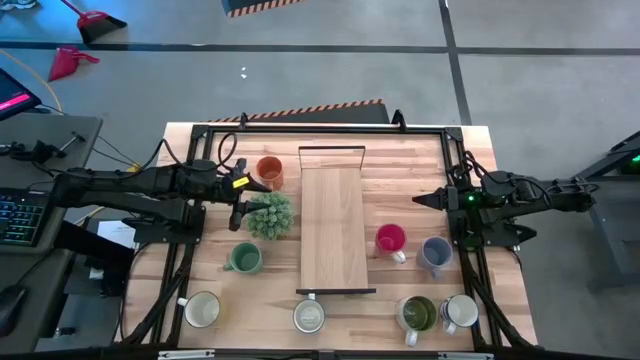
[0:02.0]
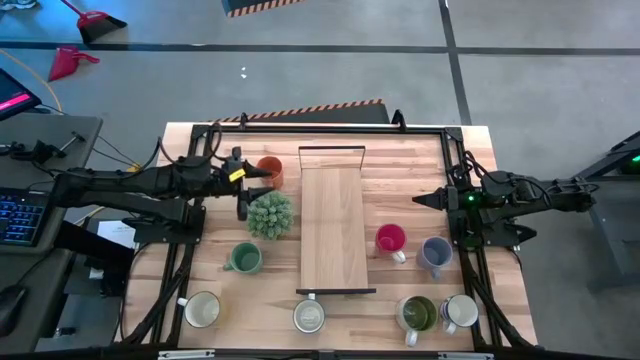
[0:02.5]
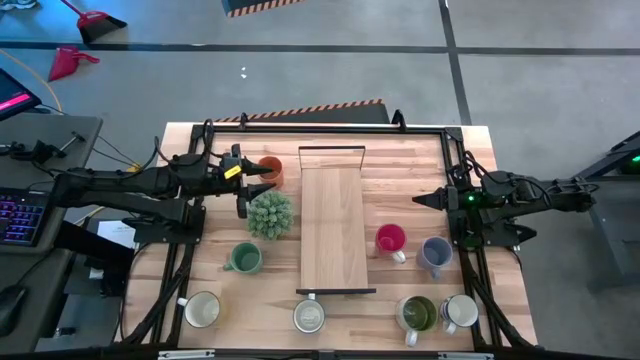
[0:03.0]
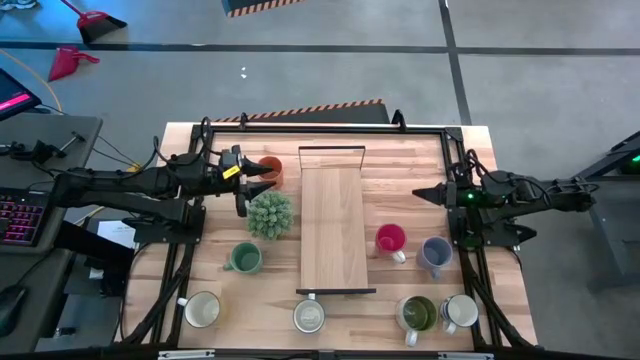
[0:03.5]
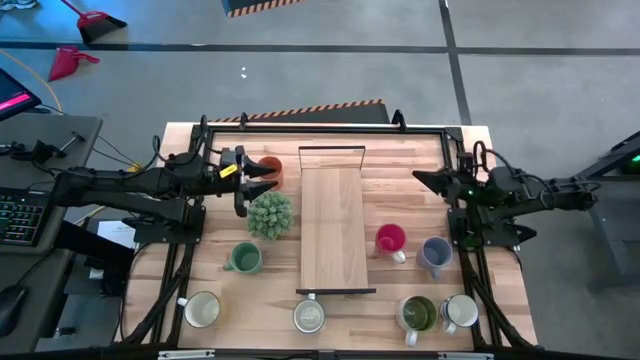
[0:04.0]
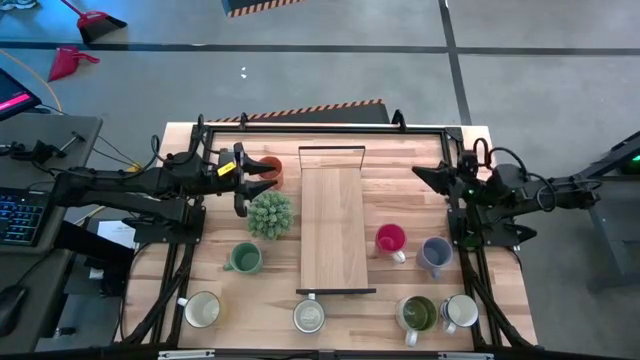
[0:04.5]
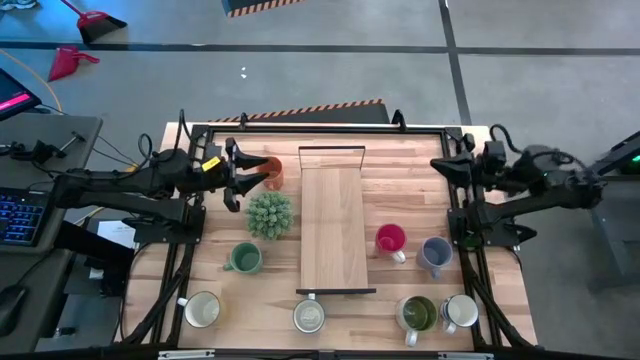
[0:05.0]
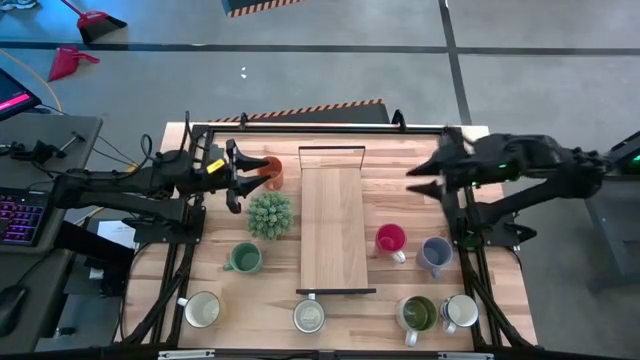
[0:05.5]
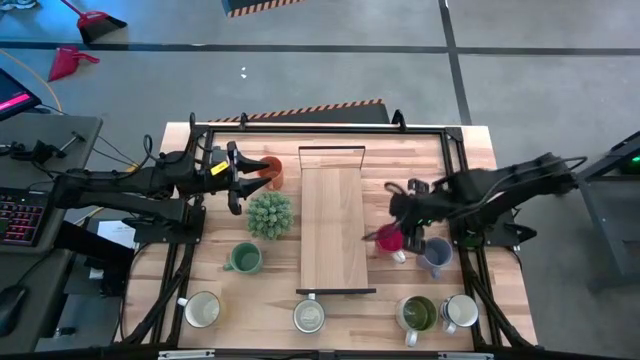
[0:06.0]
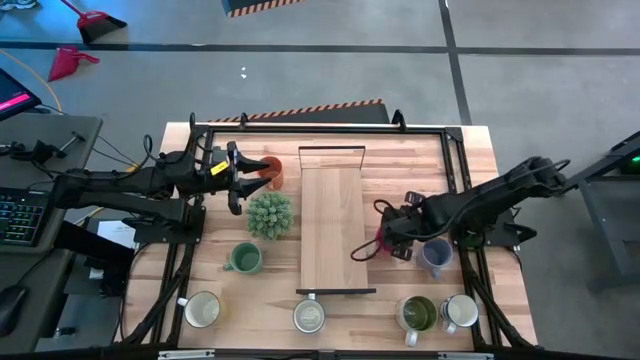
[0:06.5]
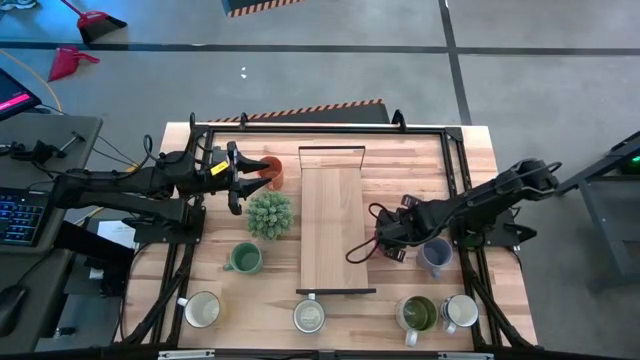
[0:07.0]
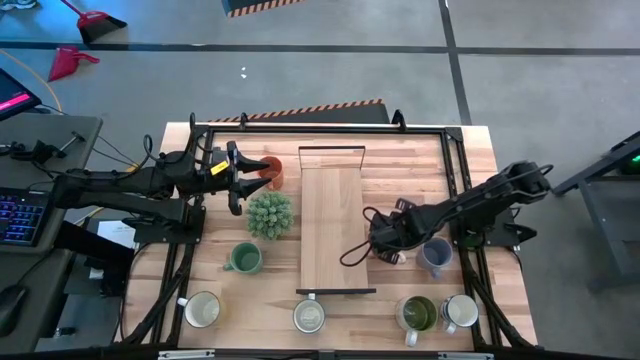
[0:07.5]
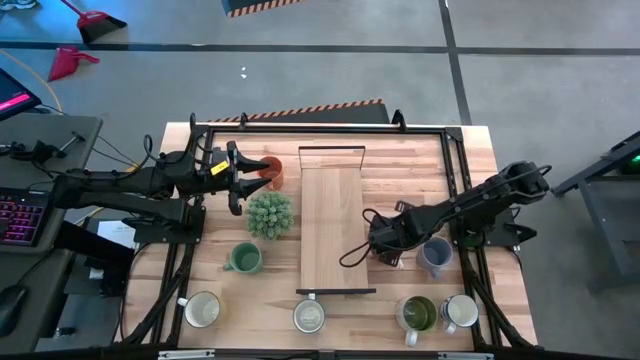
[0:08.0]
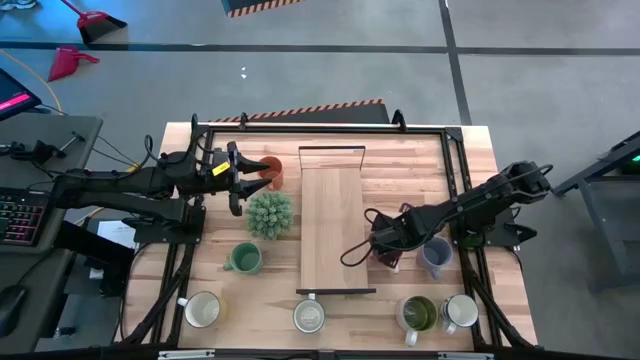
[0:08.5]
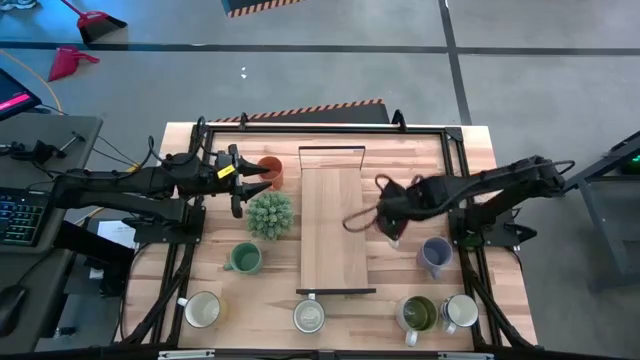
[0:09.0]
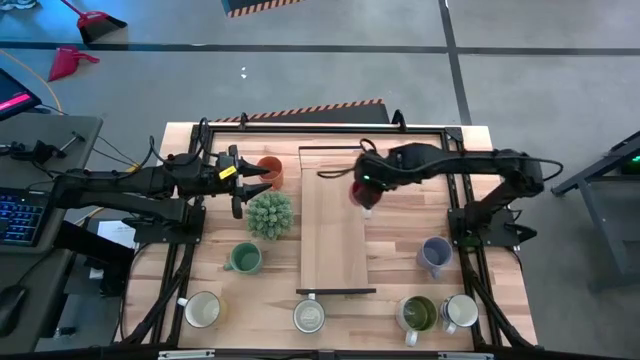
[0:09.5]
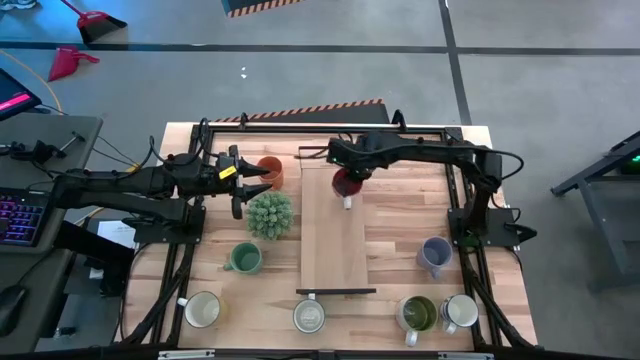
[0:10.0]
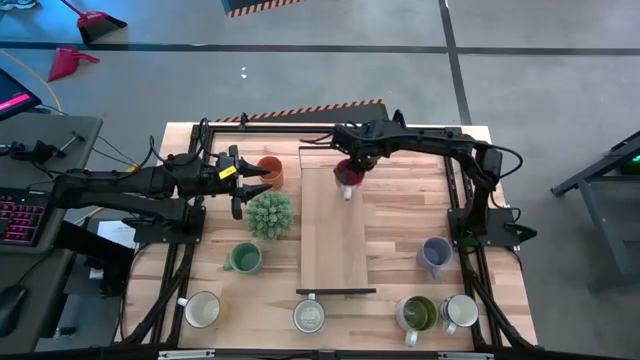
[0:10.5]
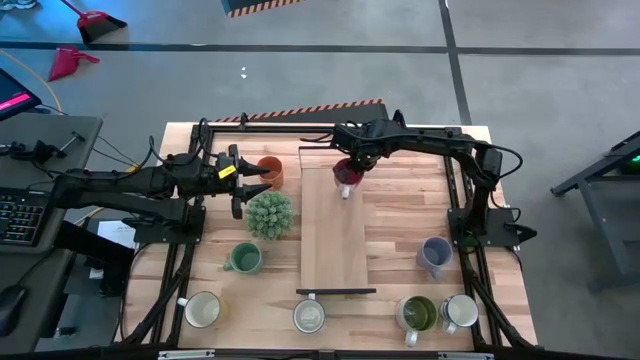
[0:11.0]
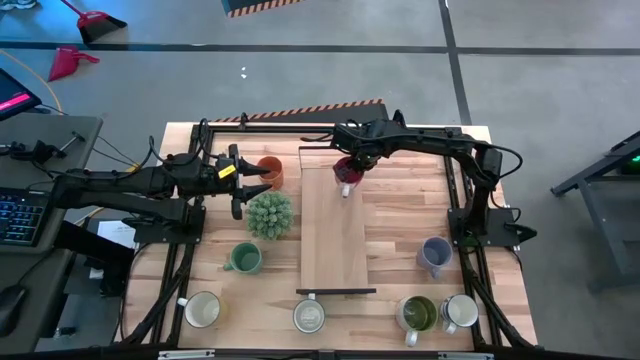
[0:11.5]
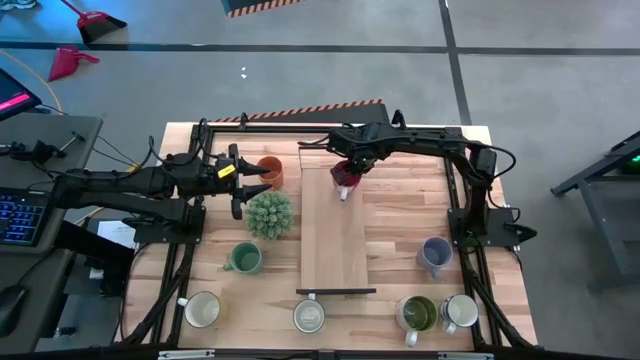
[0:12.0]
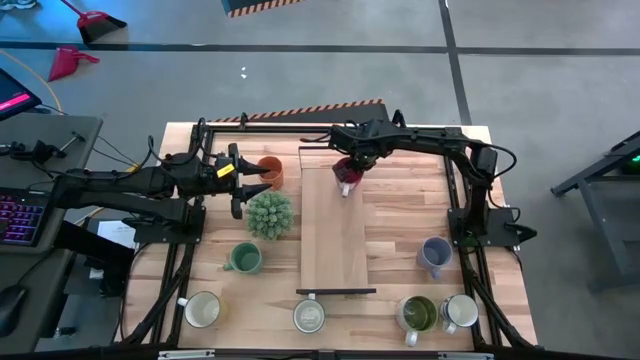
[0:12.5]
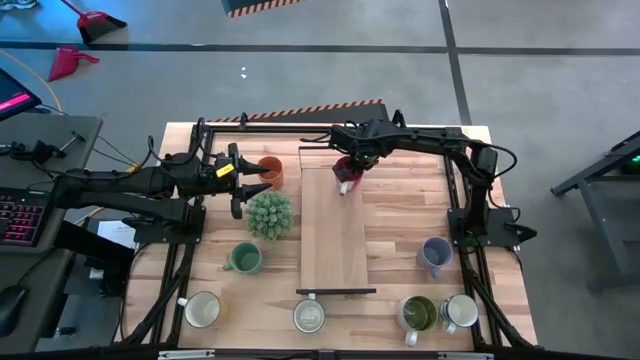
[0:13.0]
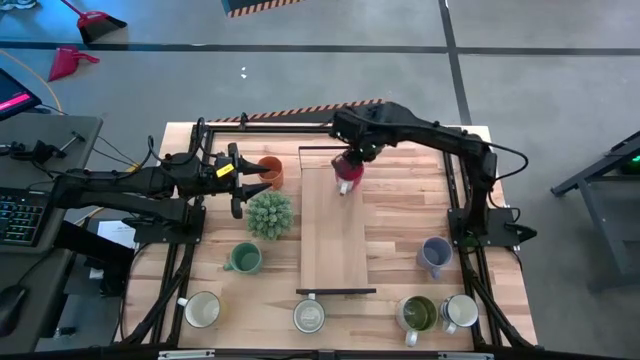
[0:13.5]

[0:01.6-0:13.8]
Task: Place coffee mugs
Put the red mug on the shelf

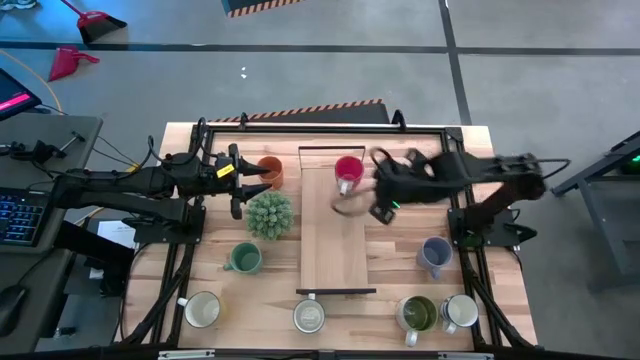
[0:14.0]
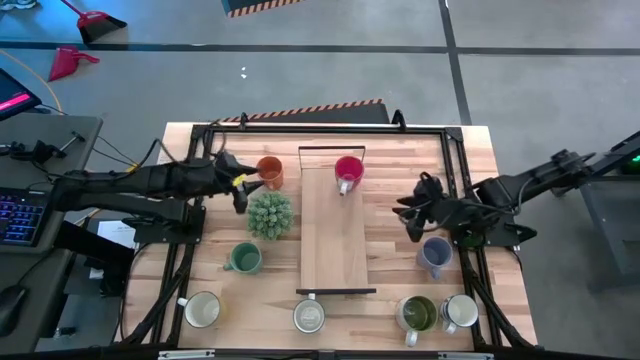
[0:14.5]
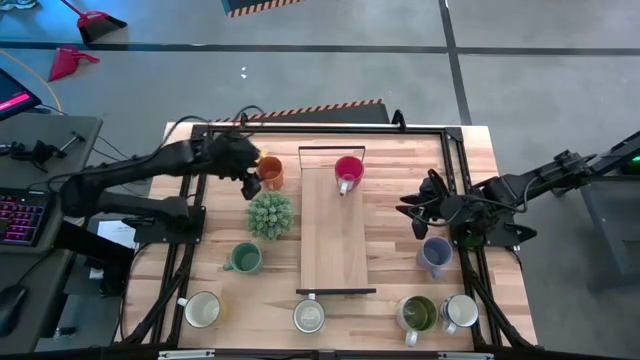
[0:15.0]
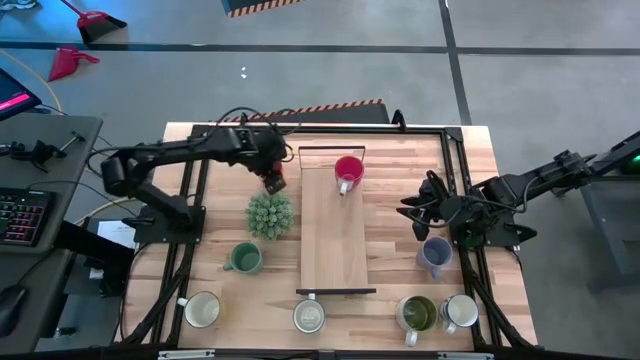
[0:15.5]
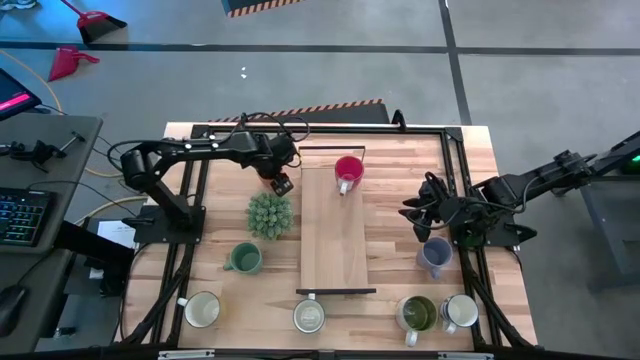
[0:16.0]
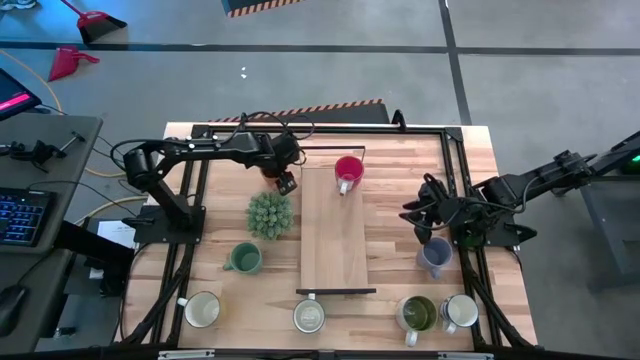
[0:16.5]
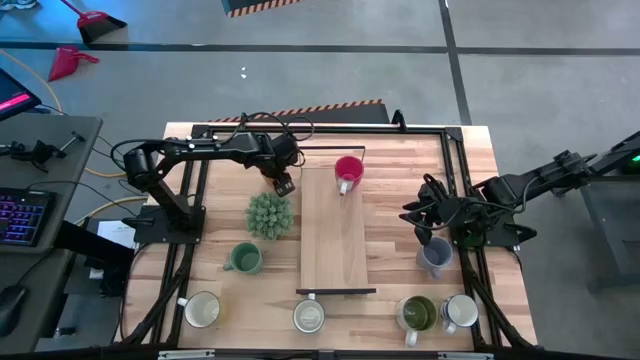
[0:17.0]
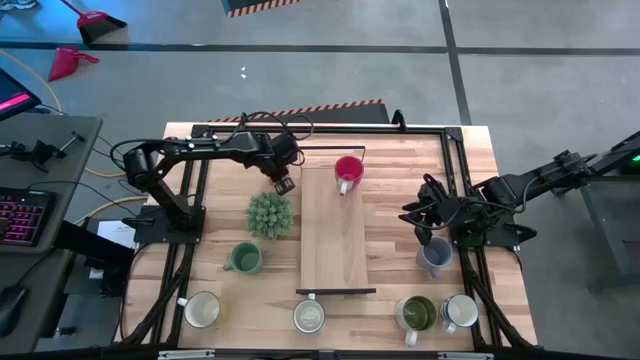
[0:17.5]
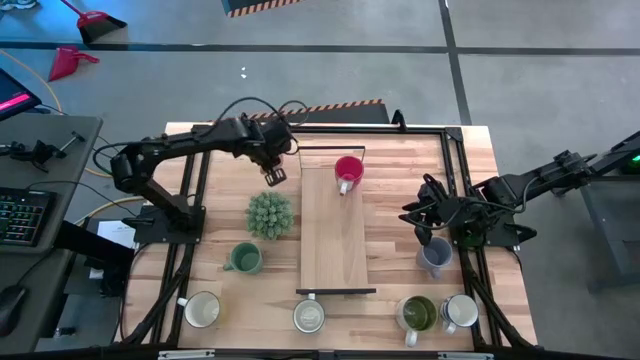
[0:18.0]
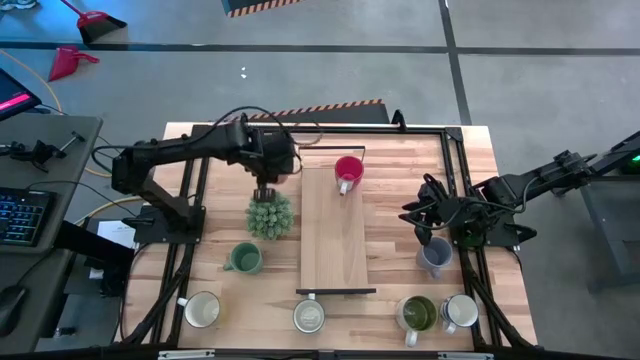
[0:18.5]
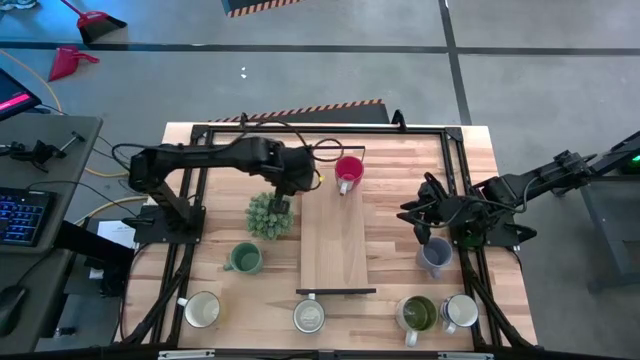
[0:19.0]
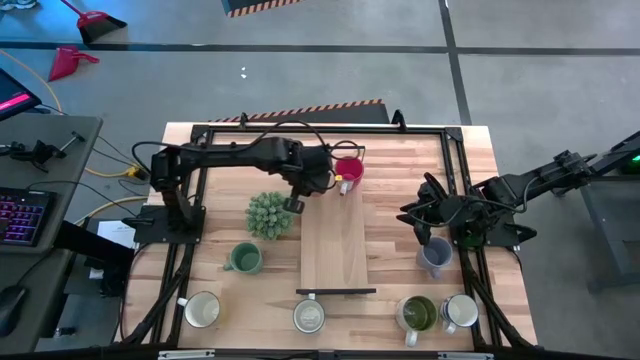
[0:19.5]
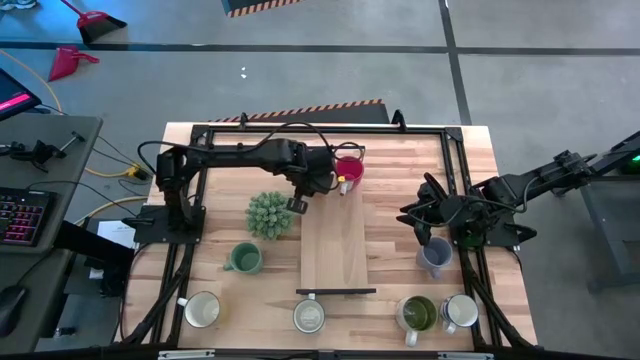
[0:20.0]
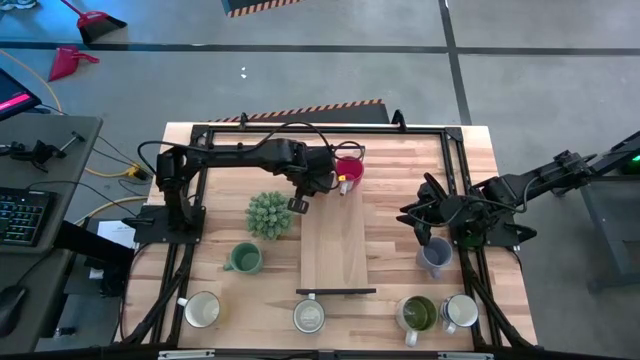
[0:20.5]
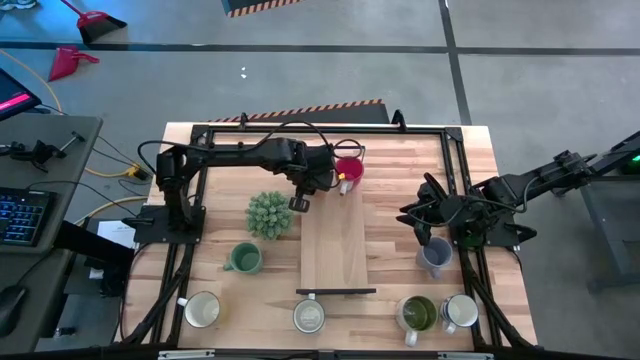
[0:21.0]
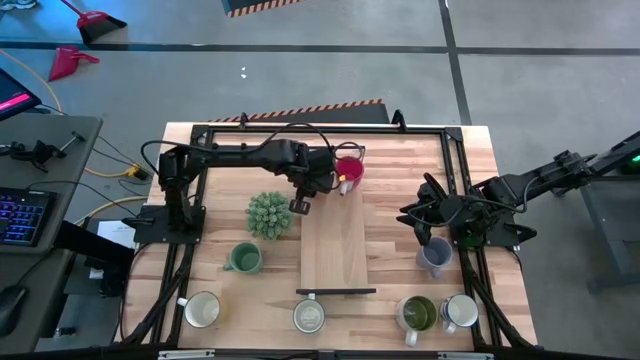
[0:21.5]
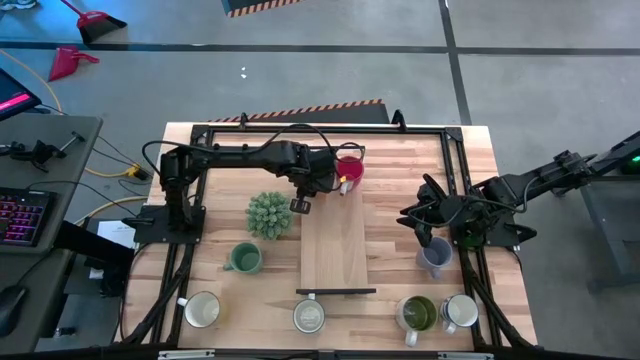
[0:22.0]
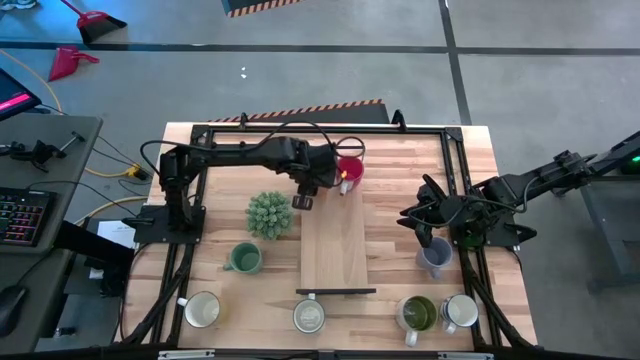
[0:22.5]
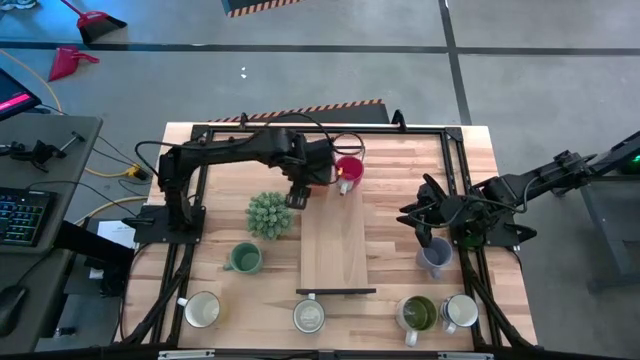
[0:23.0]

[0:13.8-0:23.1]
Put the orange mug on the shelf
